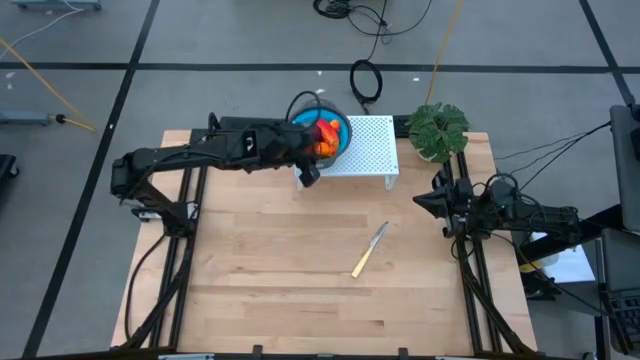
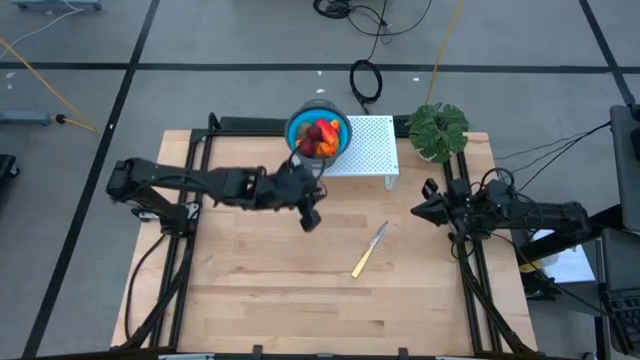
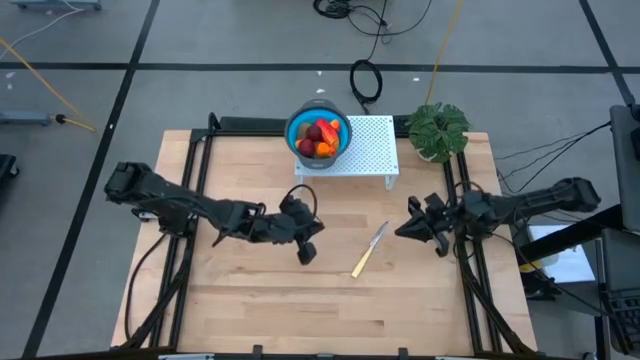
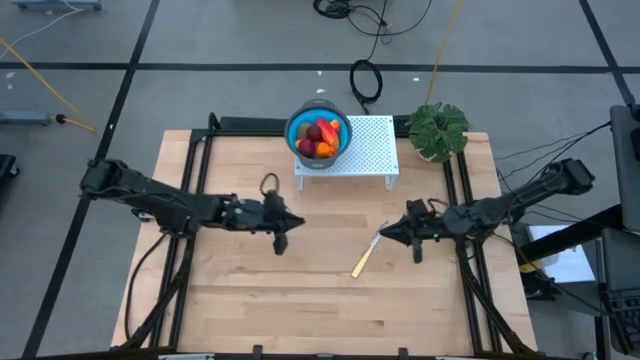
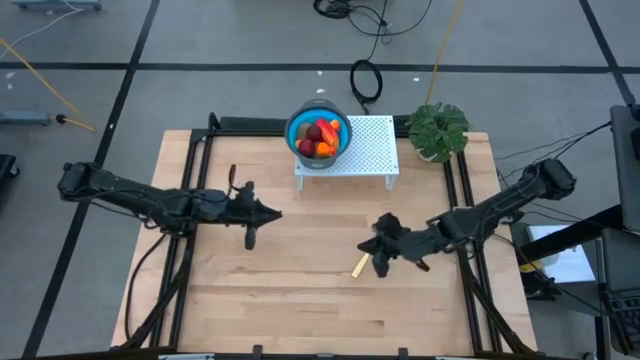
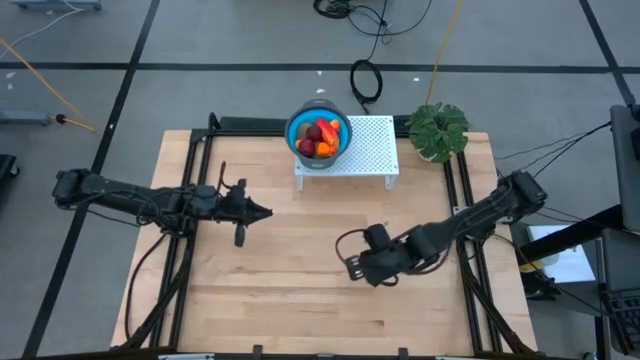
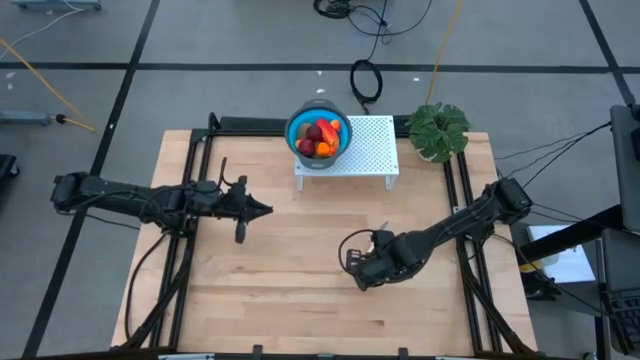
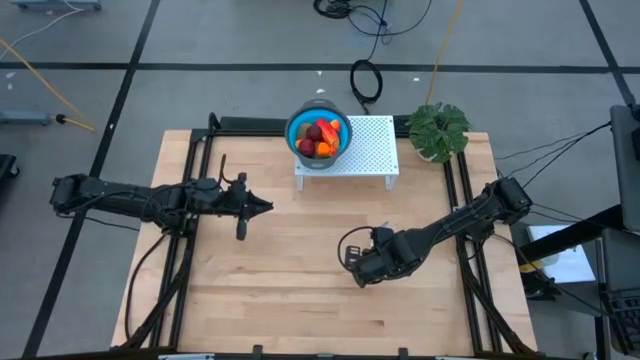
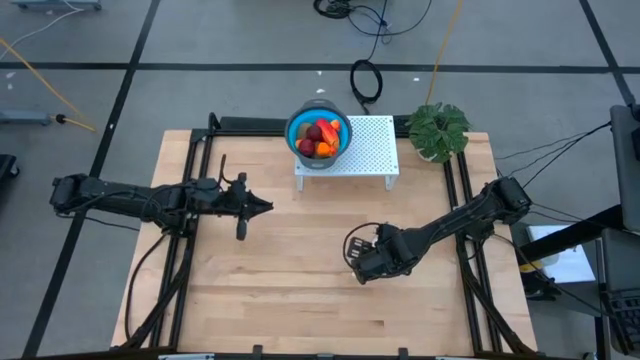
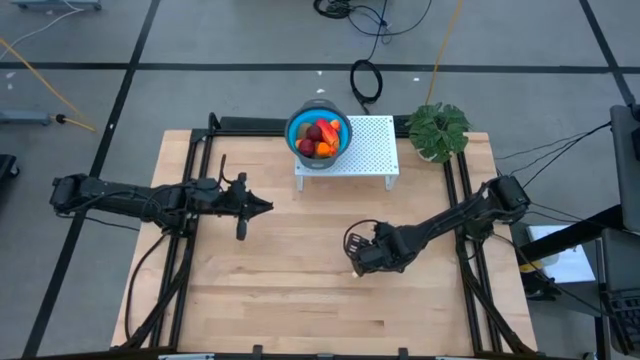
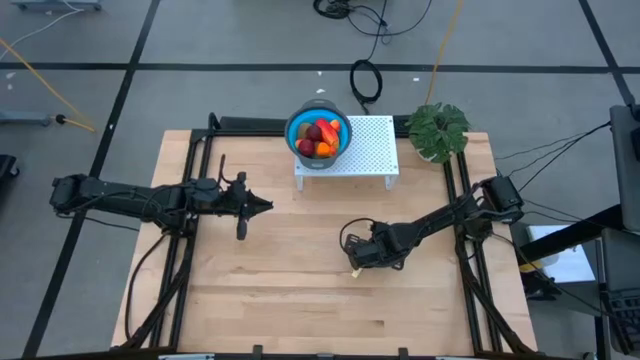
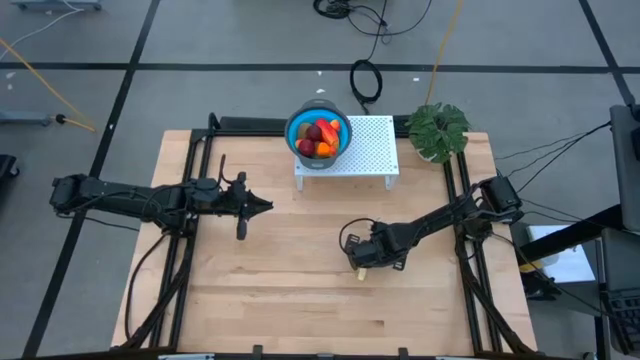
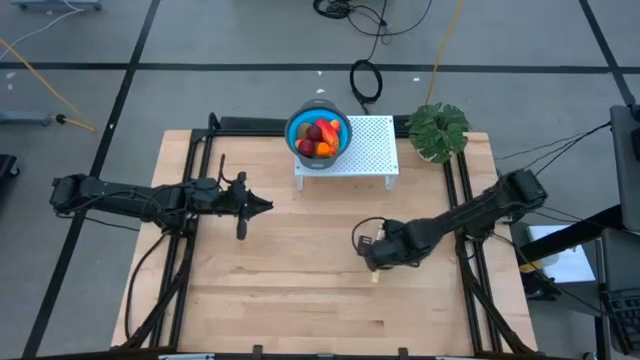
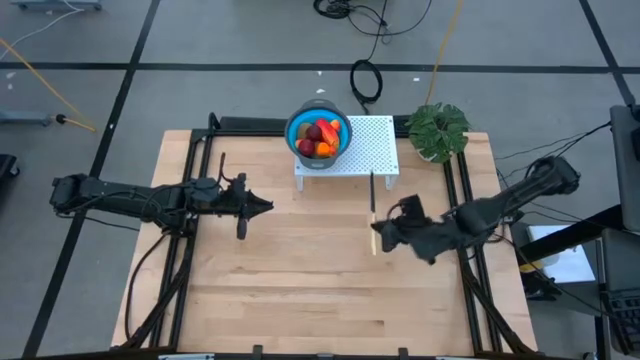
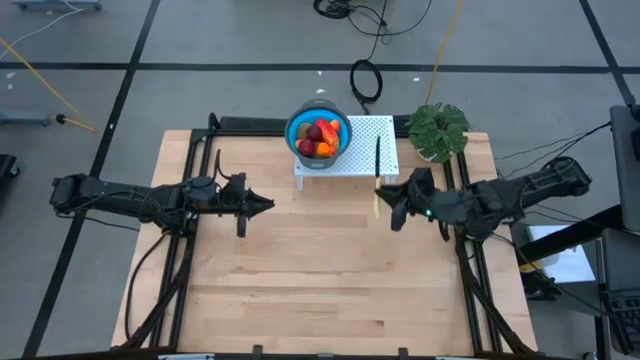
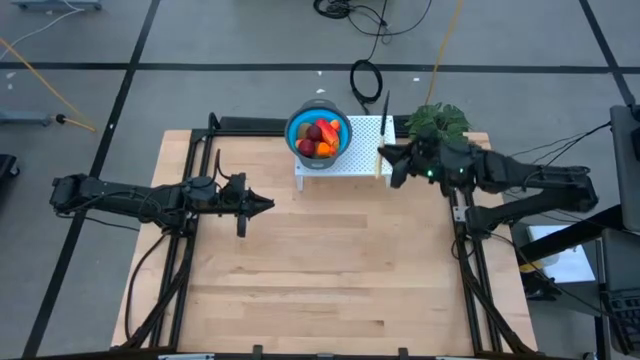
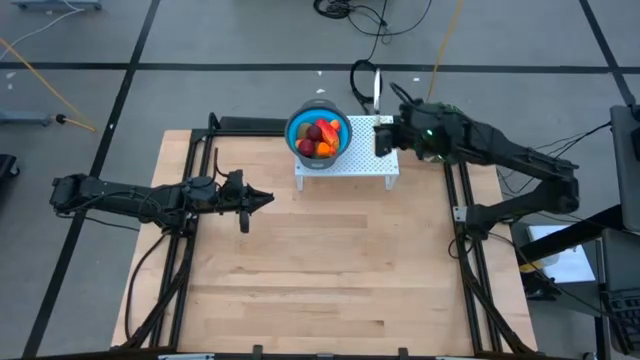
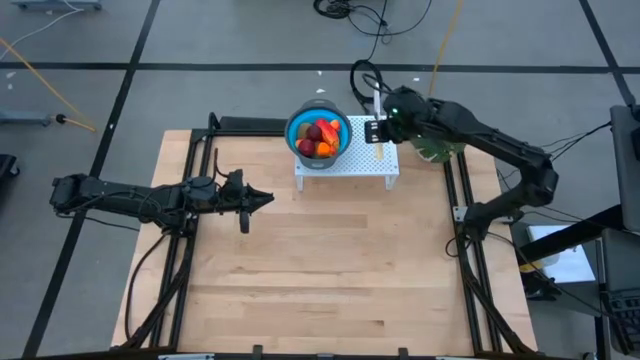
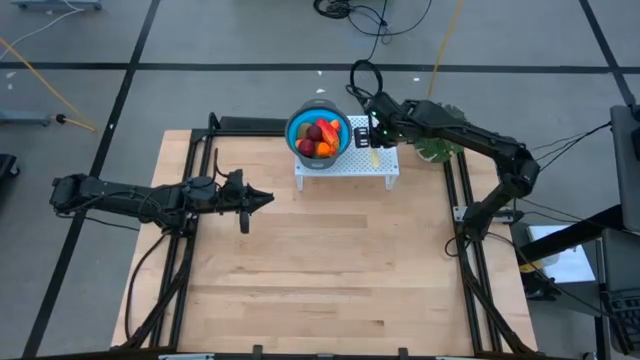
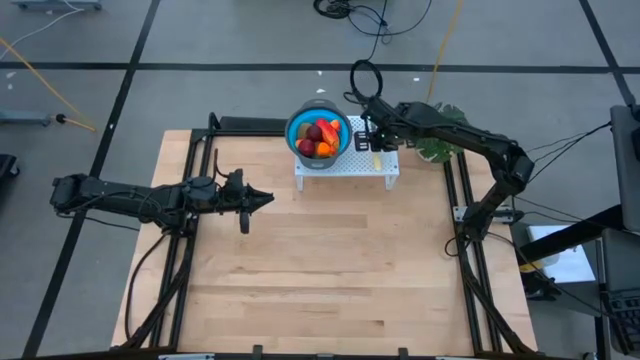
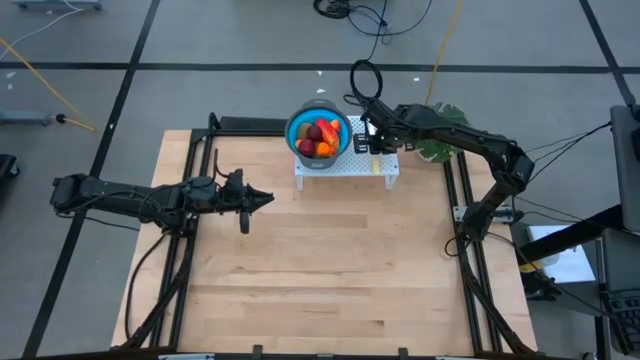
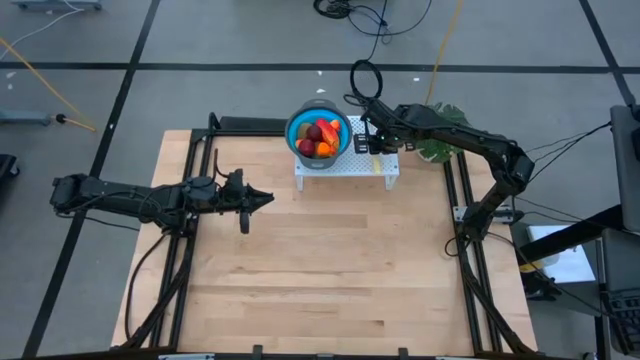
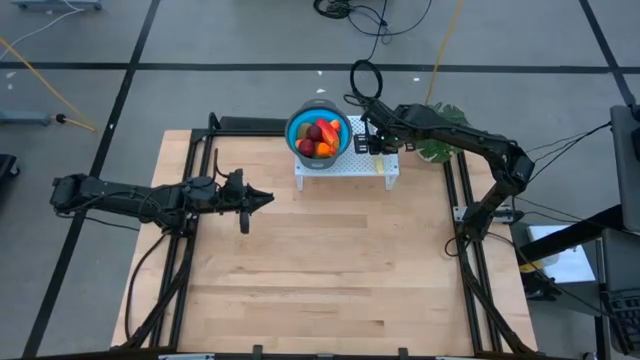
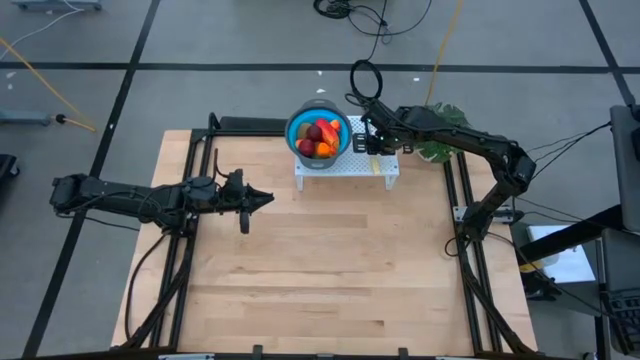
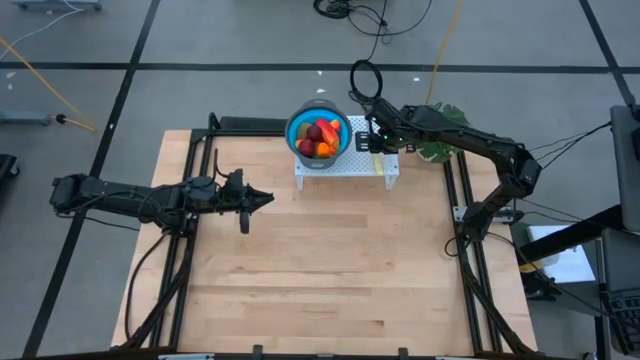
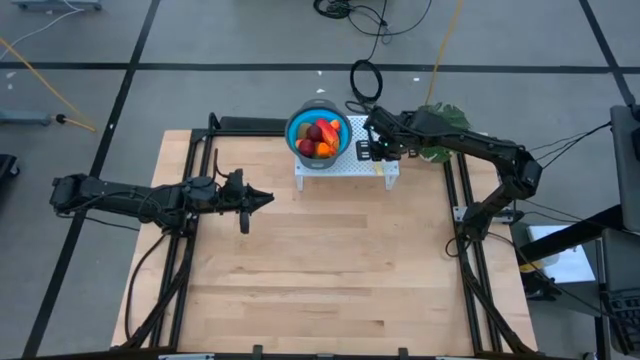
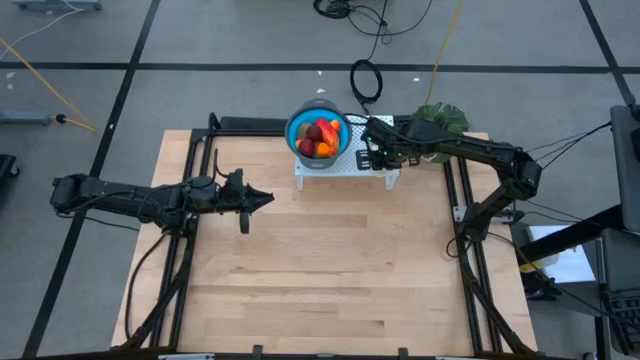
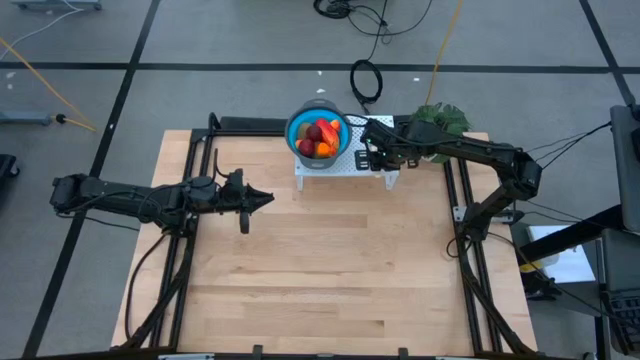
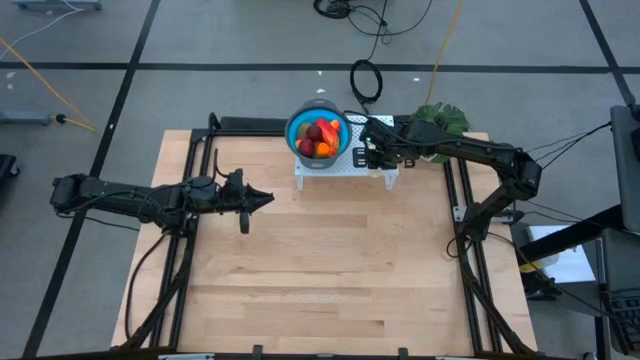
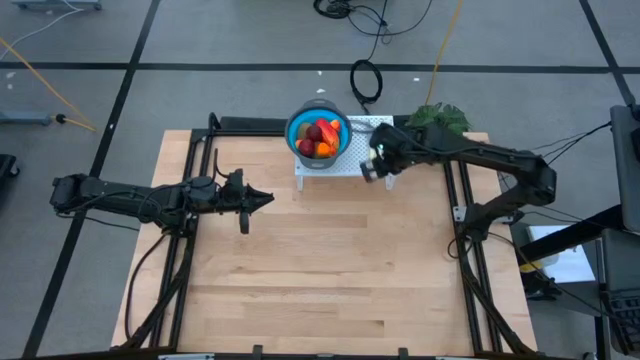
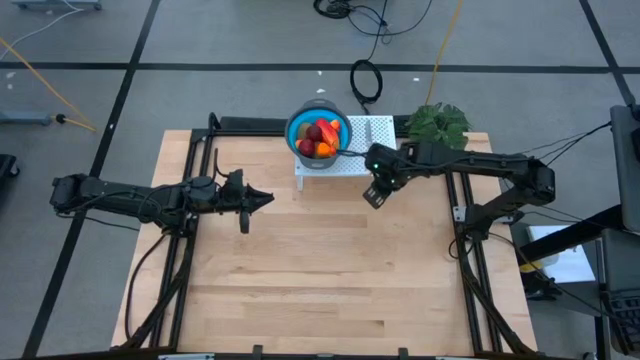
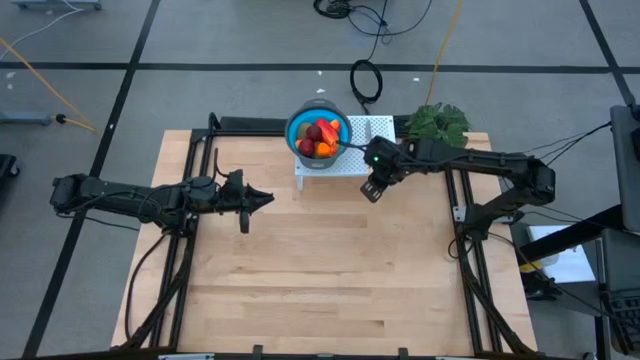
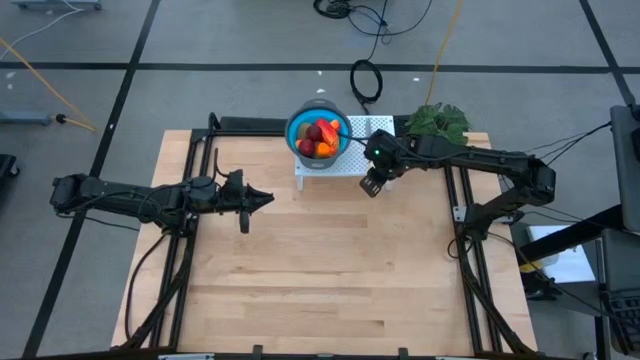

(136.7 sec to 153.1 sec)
Task: Pick & Place Fruit
Put the yellow knife on the shelf

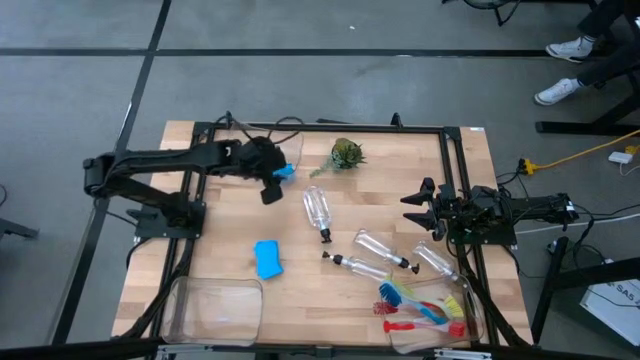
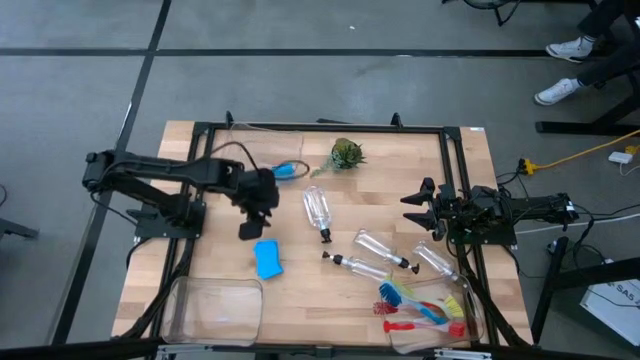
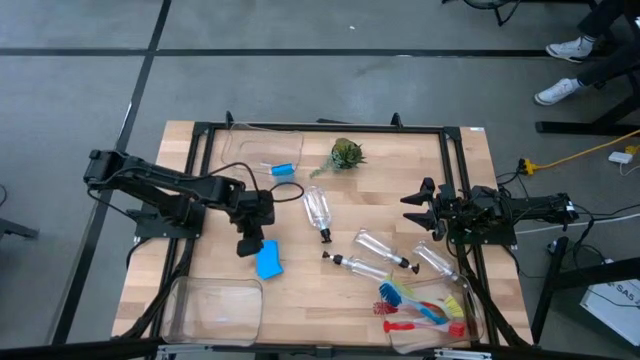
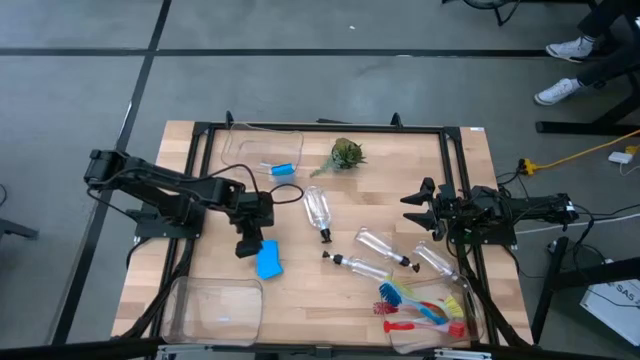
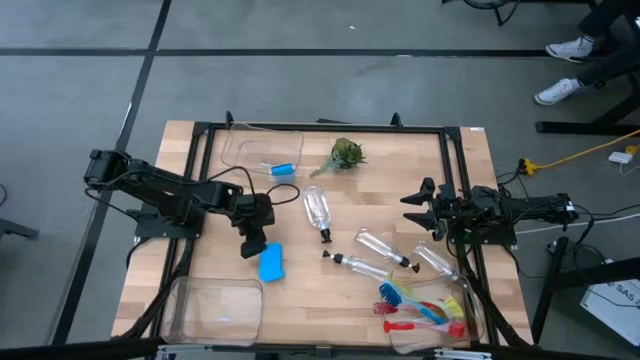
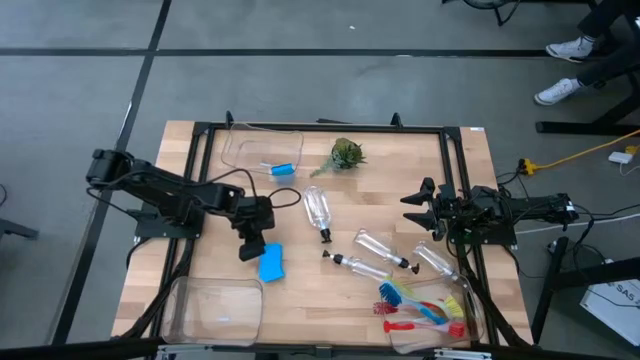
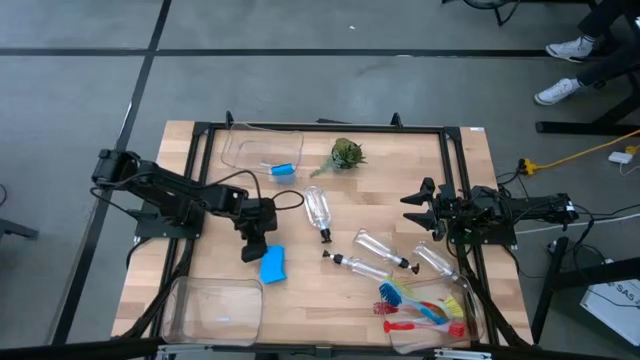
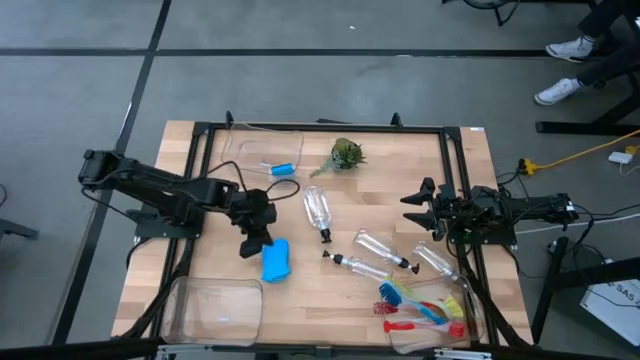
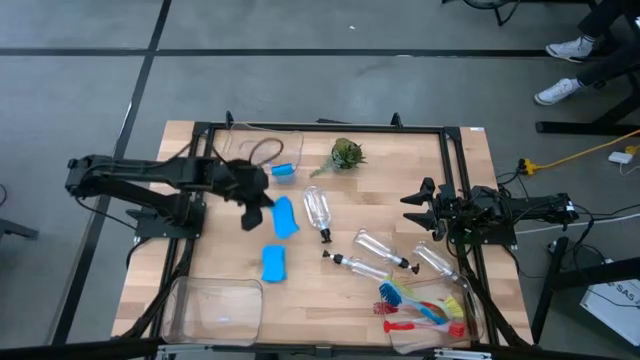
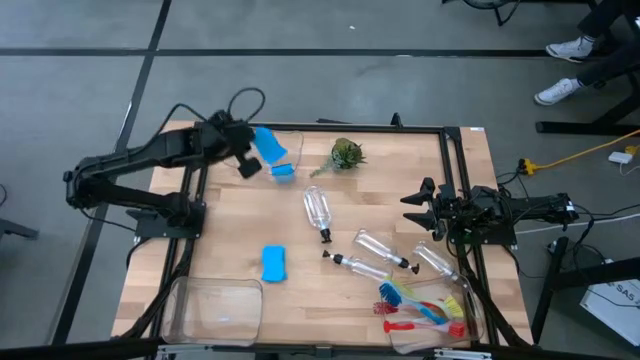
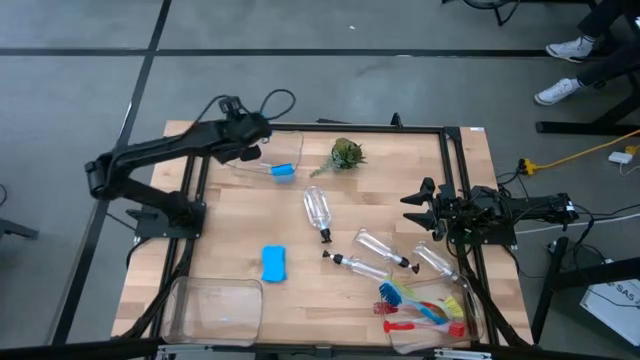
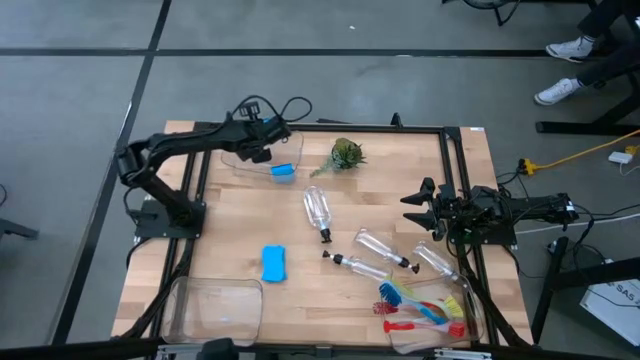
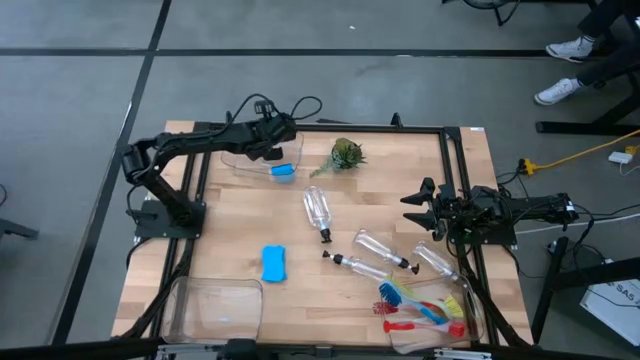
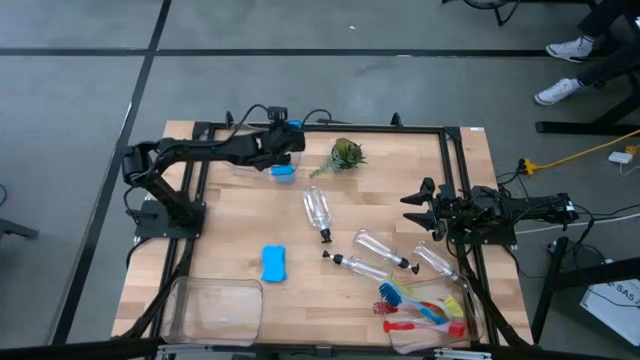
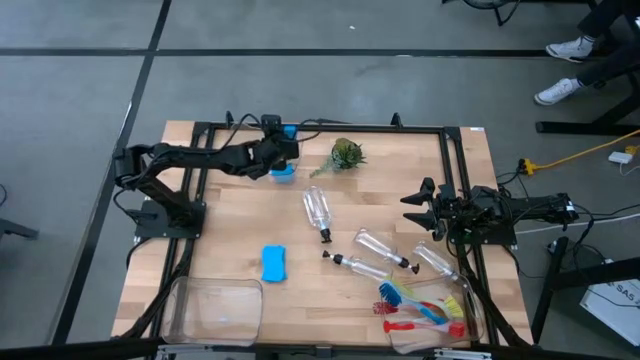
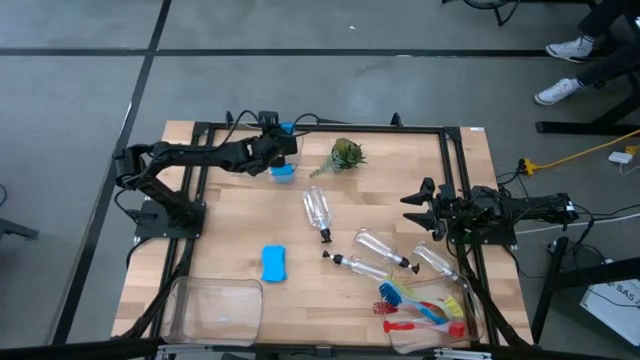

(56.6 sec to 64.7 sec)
Task: Pick & Place Kitchen Sink Supplies
Put the blue sponge into the top transparent bin
